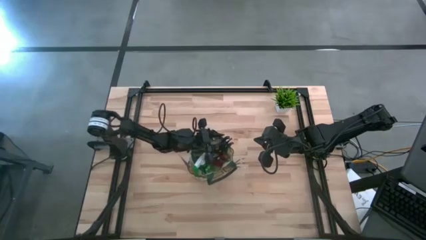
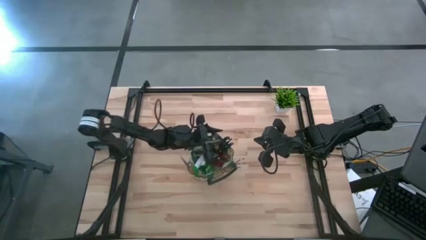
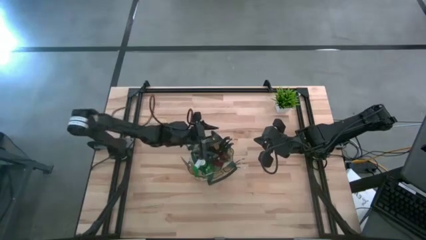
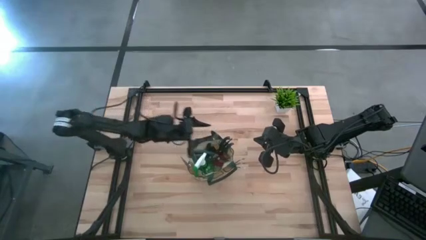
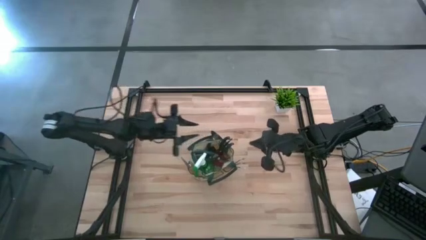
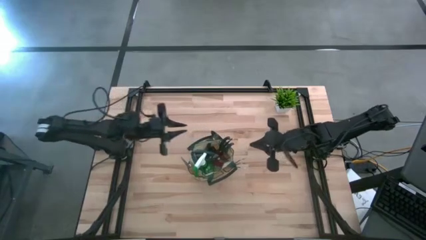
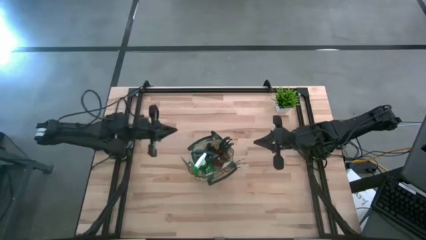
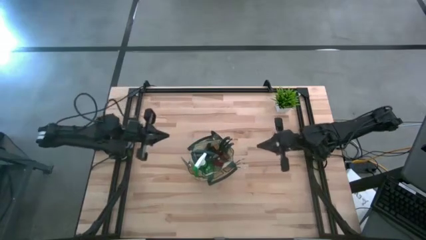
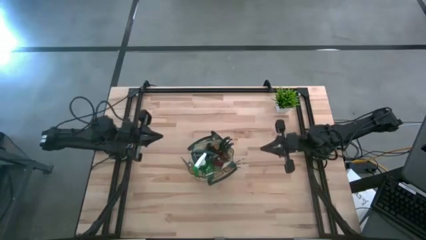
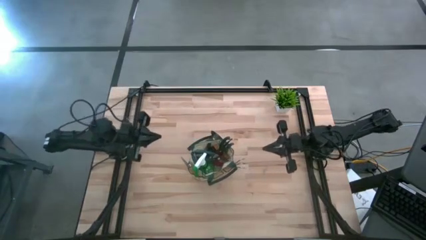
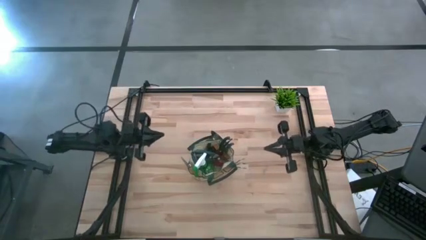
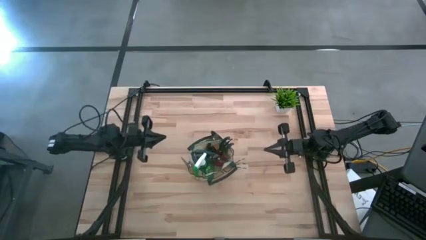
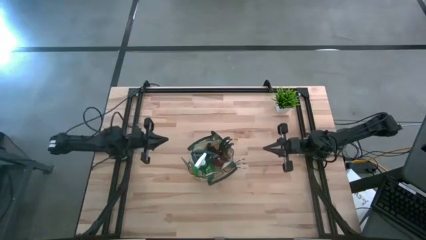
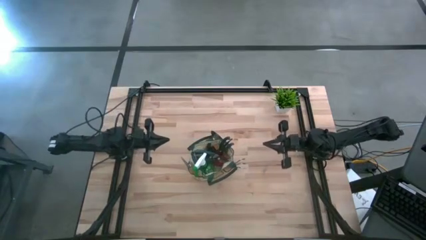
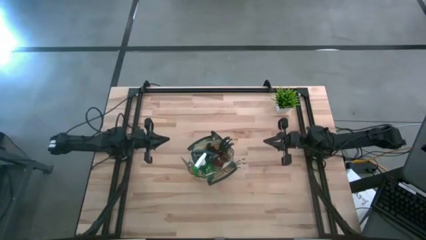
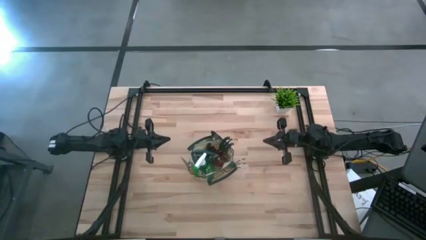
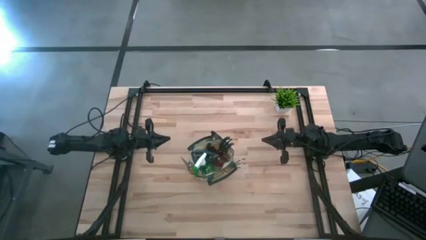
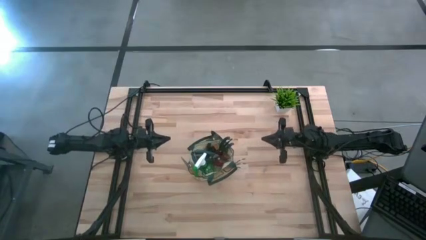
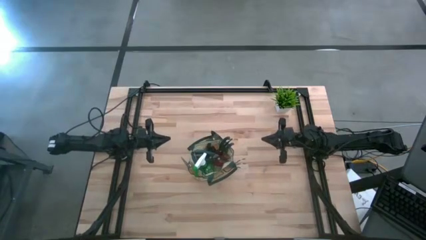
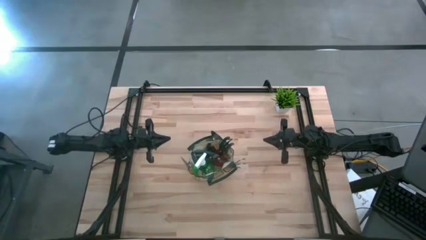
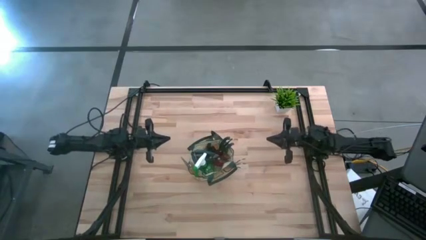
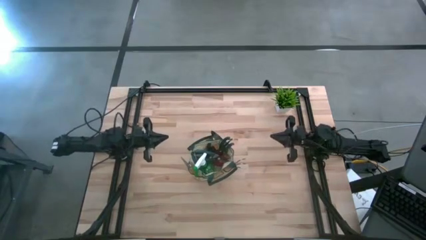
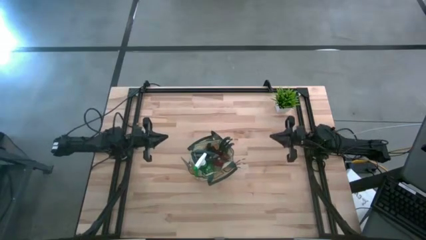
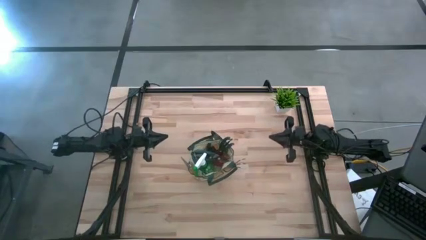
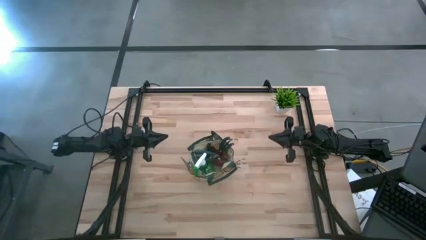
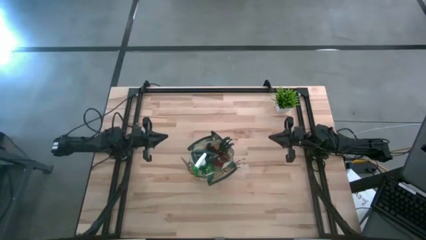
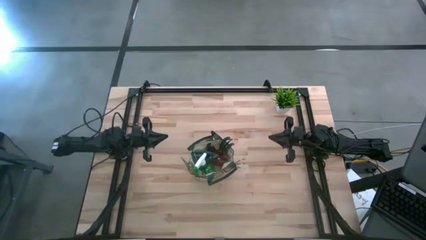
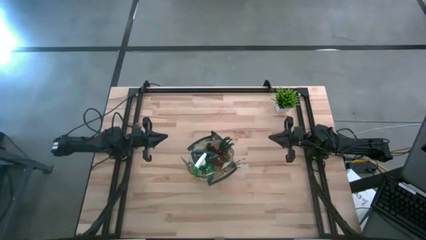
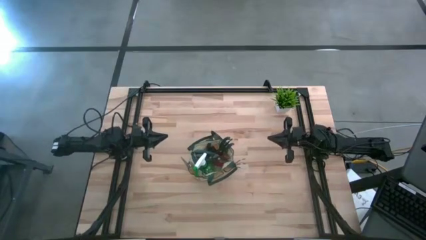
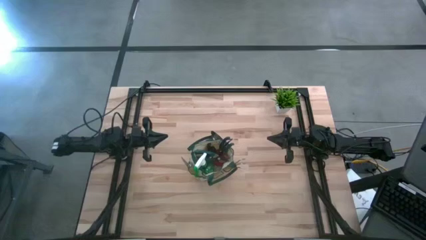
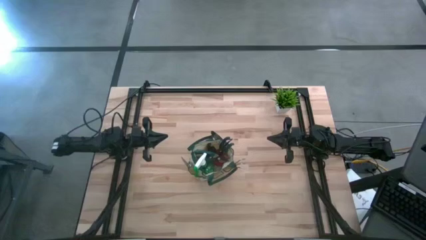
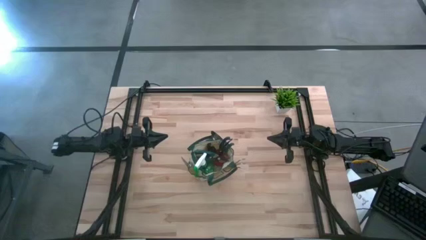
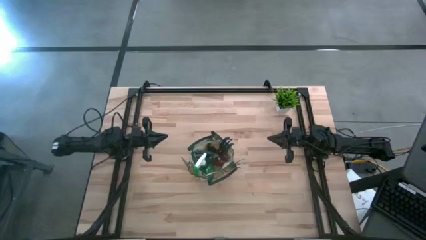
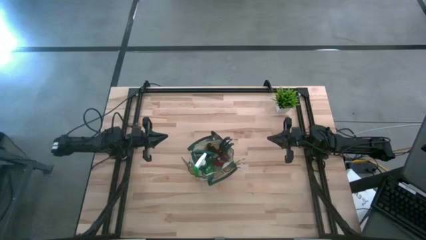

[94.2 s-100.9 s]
Task: Pick & Place Garden tools in Gardening bag
Return to Home Position

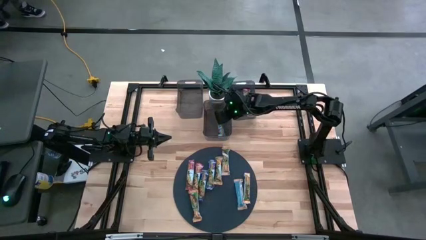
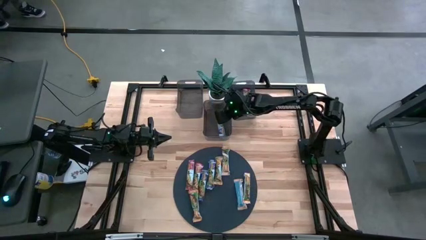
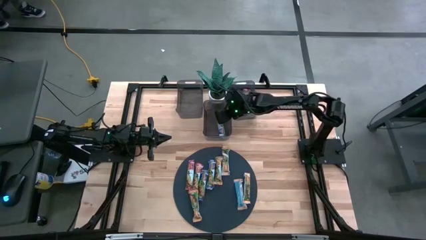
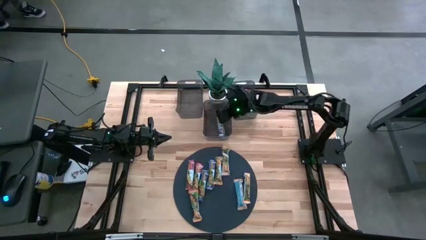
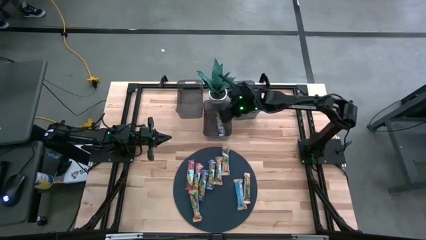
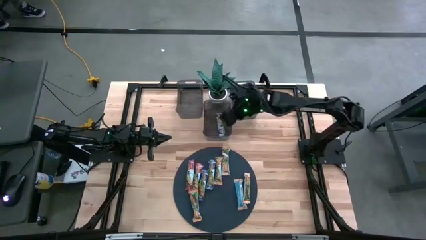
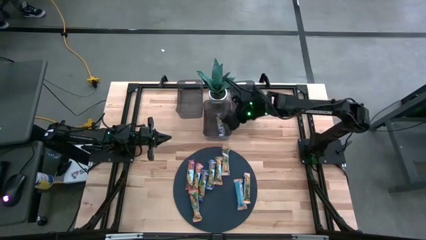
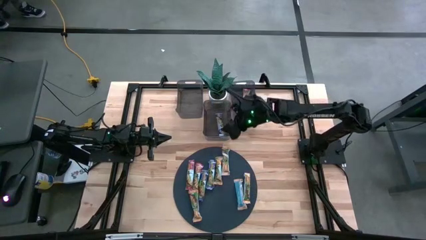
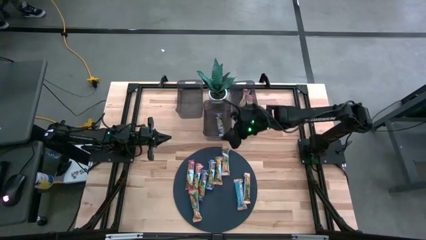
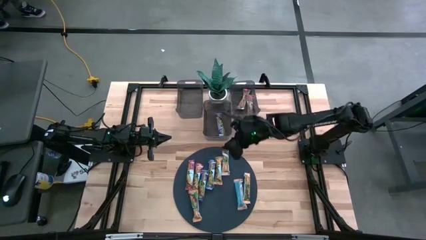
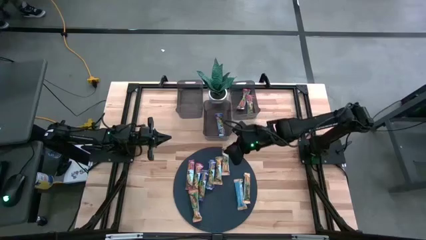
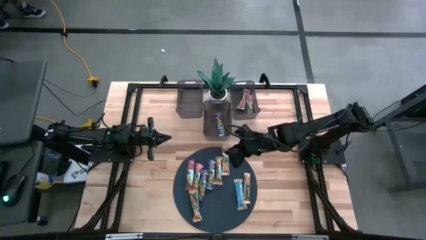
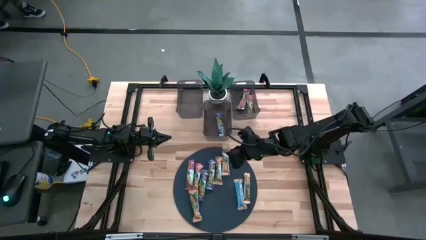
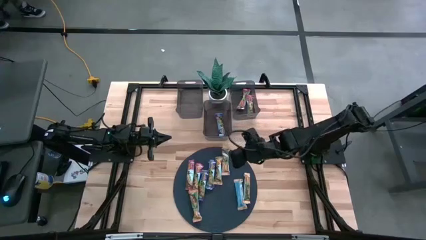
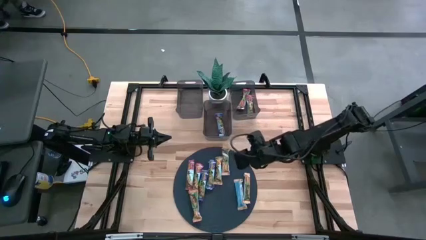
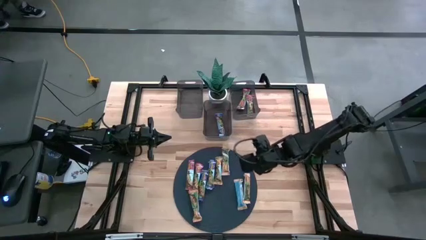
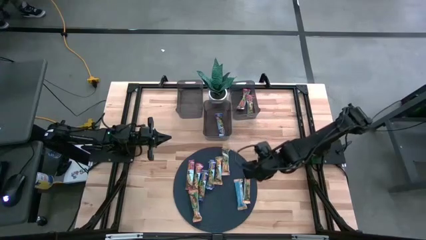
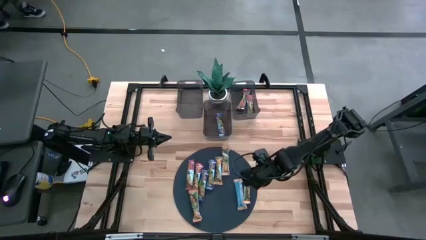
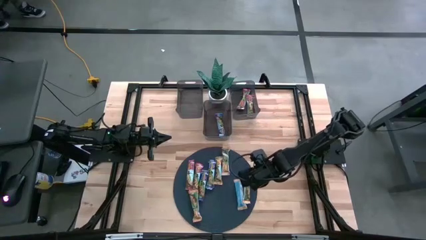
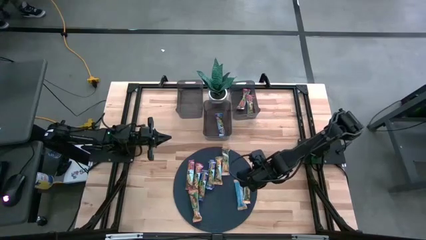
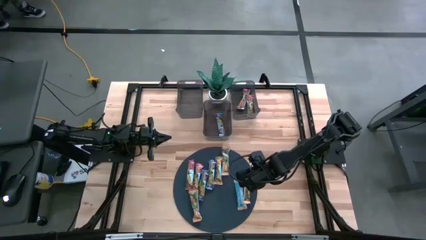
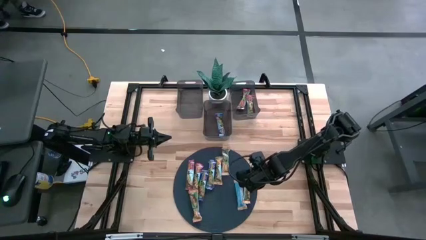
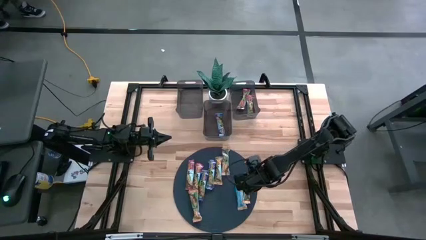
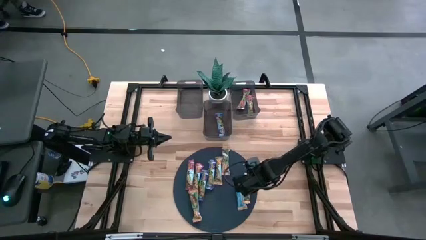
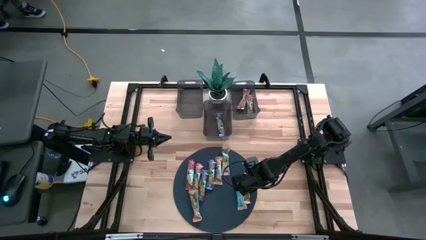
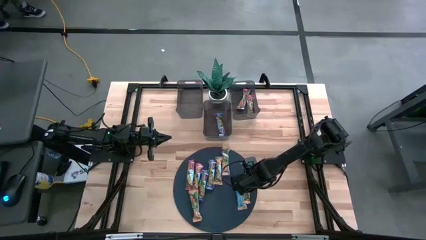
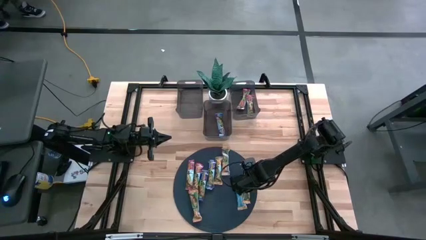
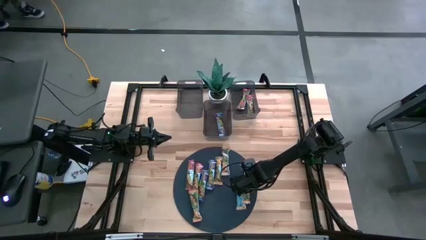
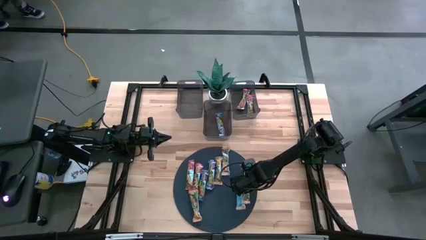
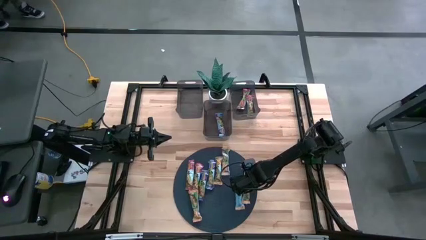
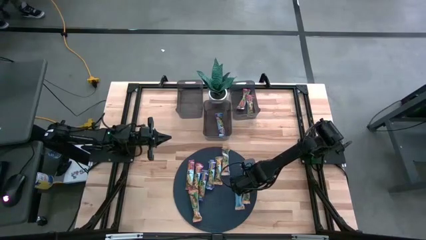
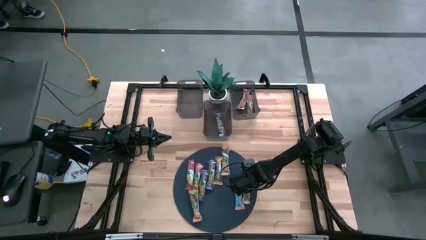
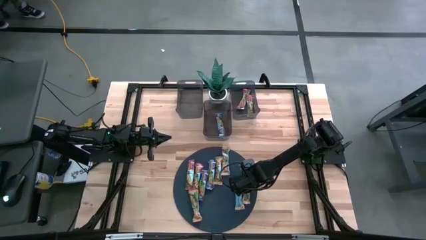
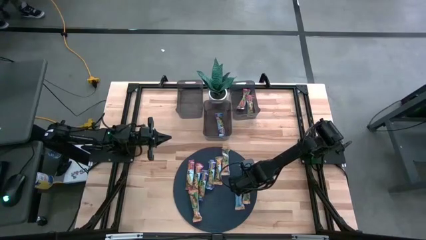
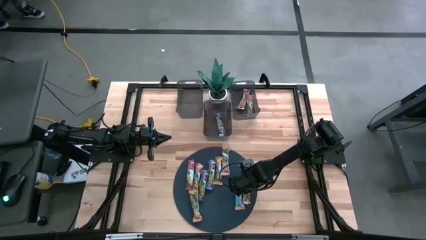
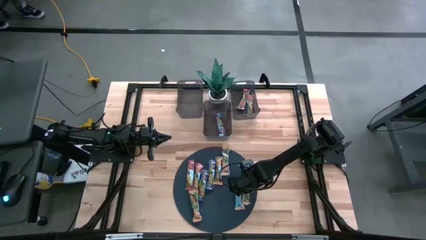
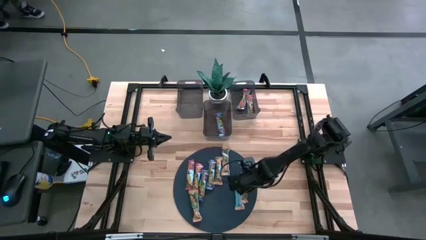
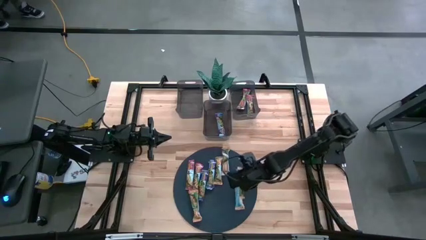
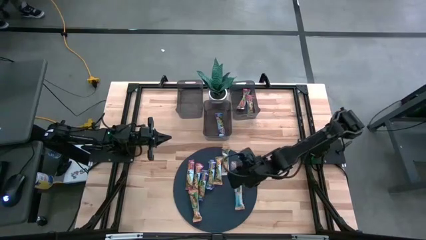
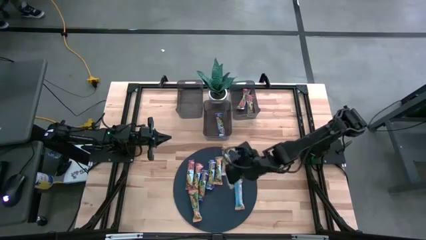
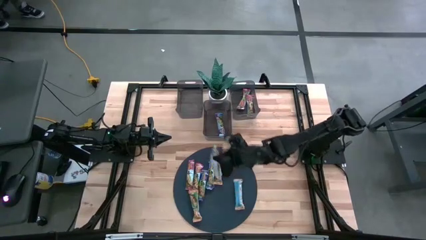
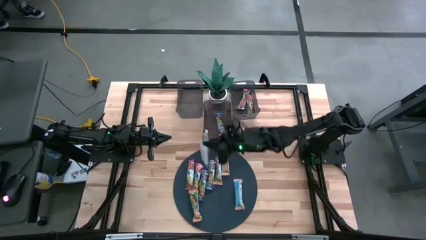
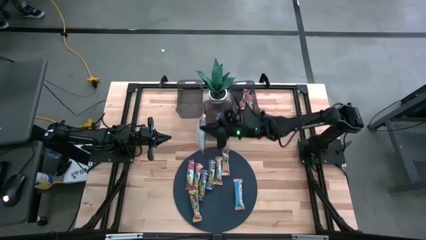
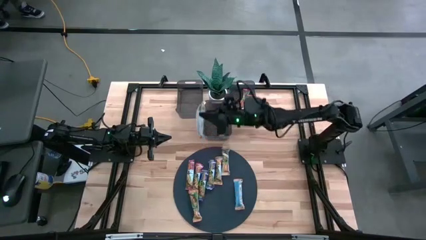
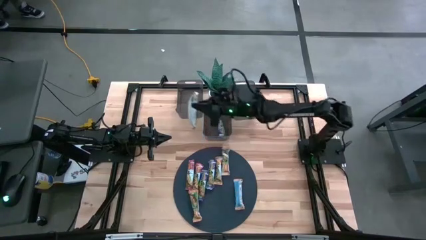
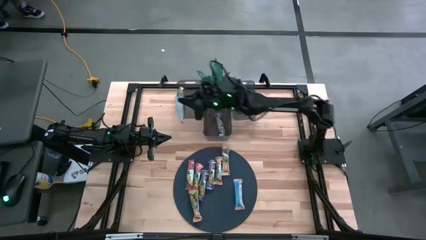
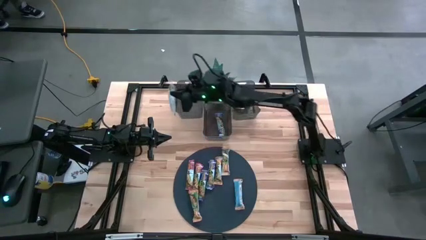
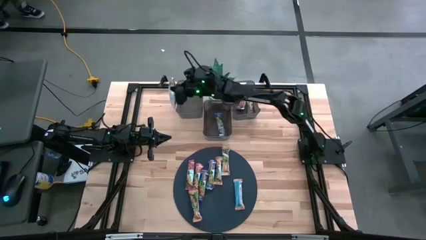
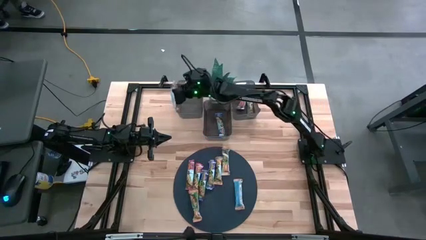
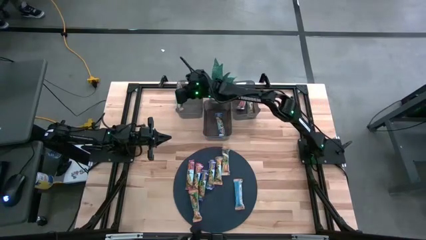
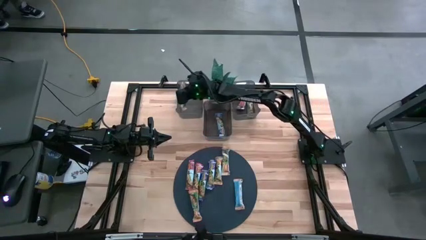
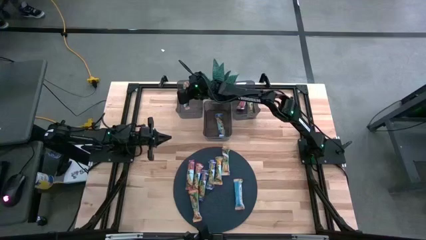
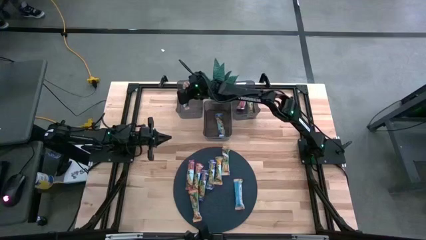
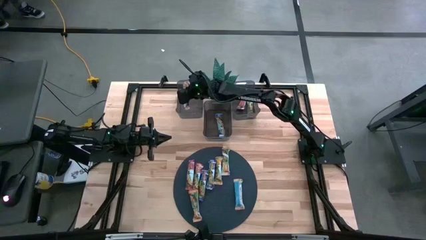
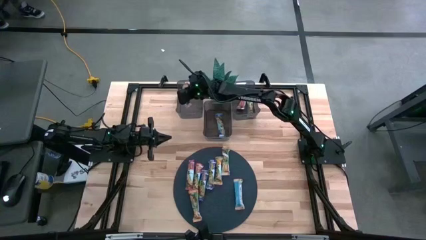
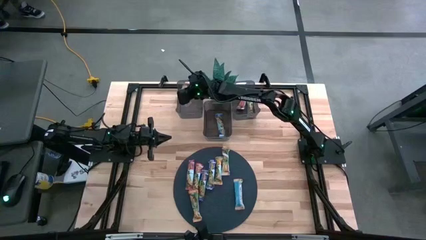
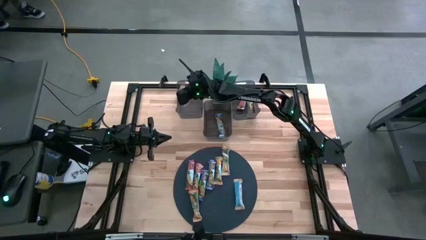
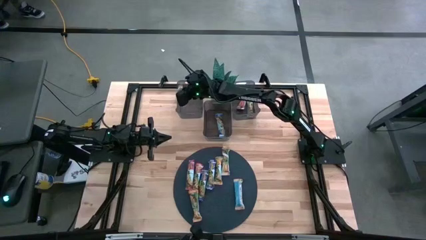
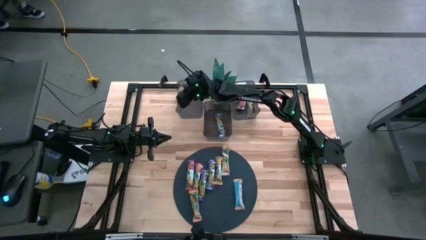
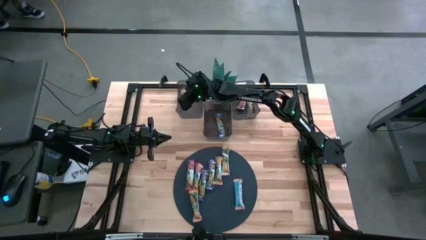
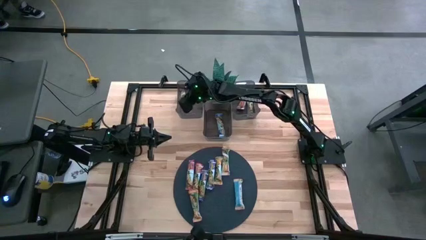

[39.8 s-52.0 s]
Task: Pick and place Granola Bars by type
Put the yellow granola bar into the left black bin
